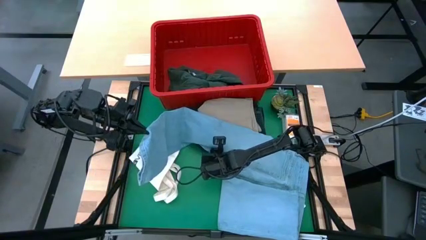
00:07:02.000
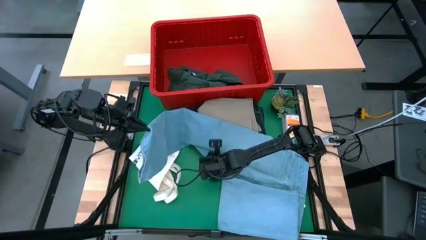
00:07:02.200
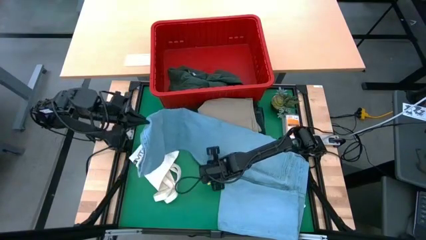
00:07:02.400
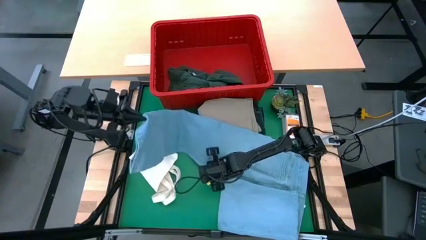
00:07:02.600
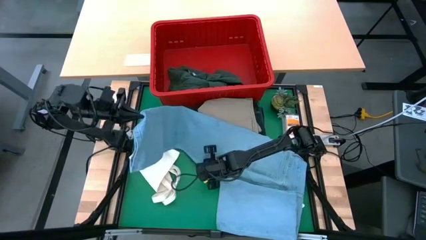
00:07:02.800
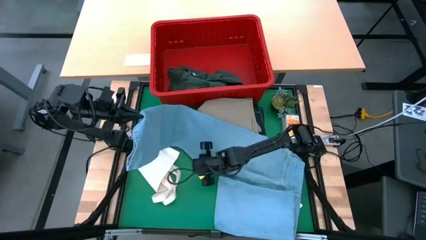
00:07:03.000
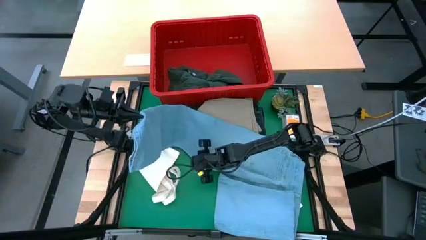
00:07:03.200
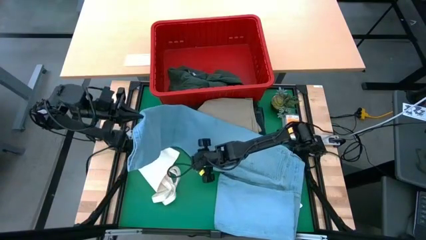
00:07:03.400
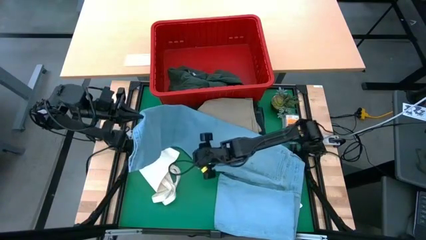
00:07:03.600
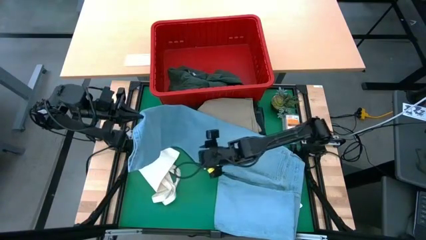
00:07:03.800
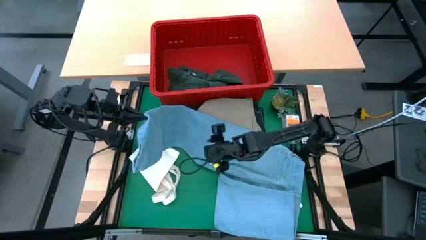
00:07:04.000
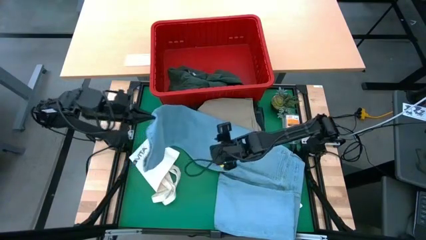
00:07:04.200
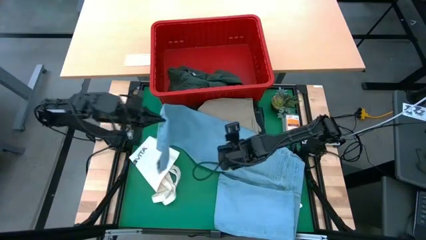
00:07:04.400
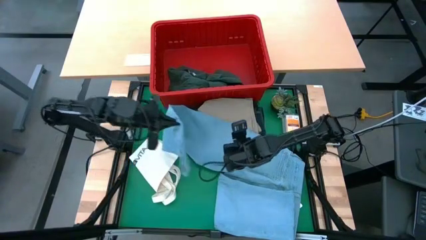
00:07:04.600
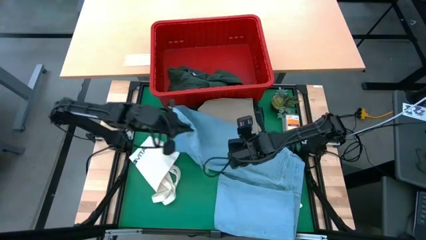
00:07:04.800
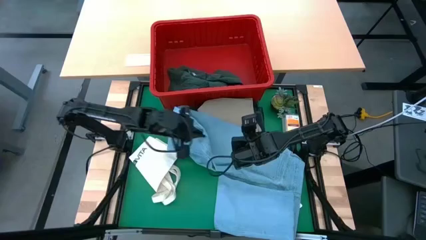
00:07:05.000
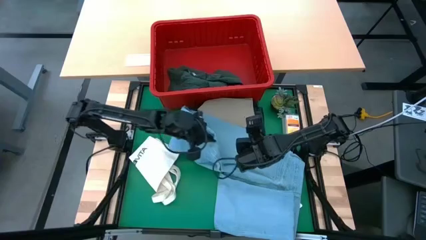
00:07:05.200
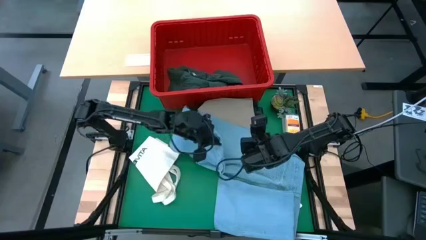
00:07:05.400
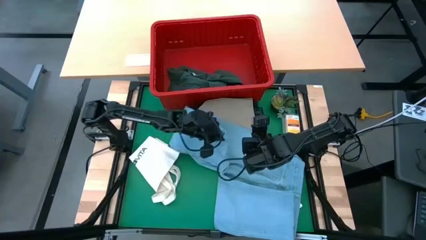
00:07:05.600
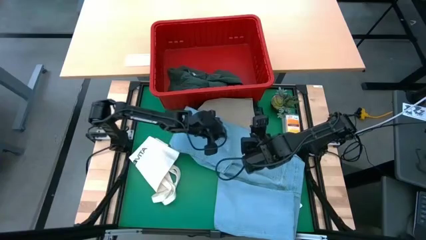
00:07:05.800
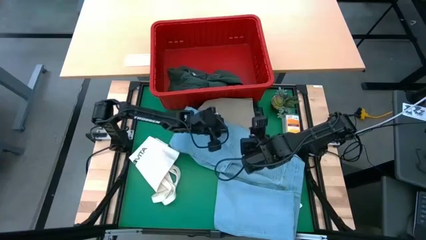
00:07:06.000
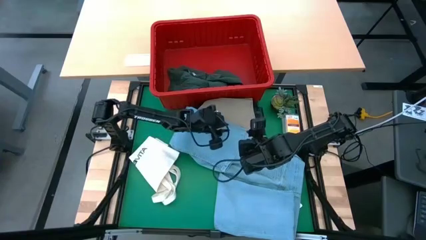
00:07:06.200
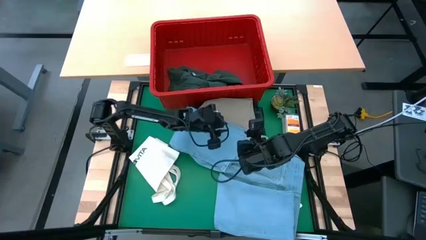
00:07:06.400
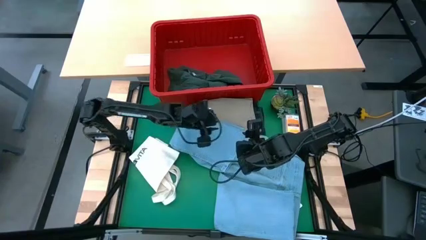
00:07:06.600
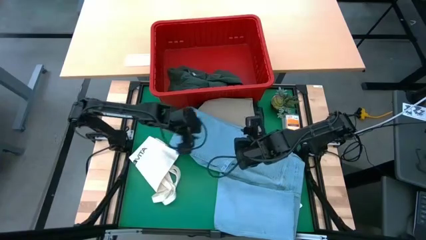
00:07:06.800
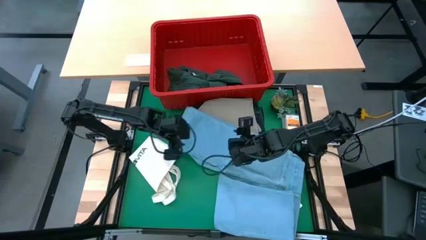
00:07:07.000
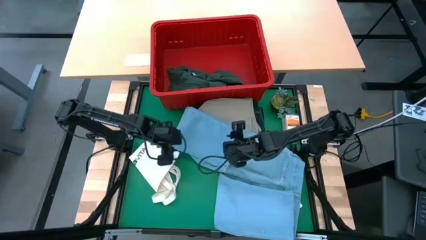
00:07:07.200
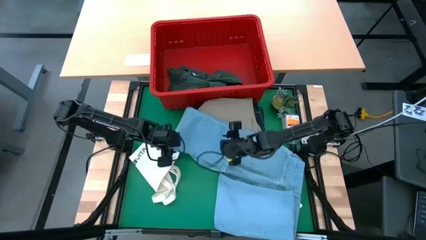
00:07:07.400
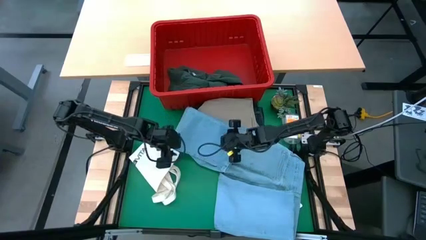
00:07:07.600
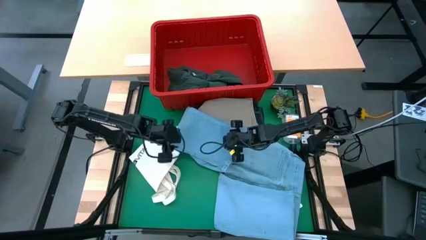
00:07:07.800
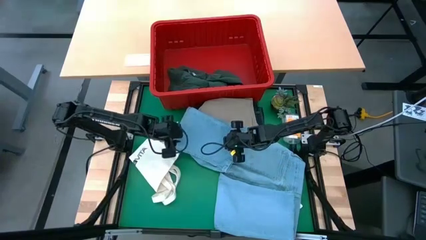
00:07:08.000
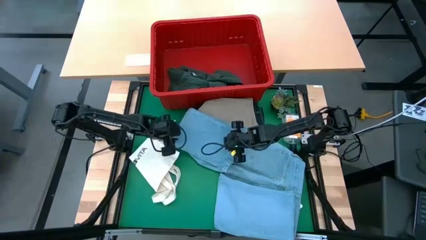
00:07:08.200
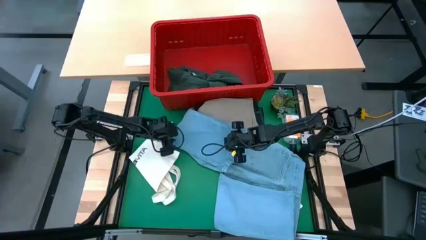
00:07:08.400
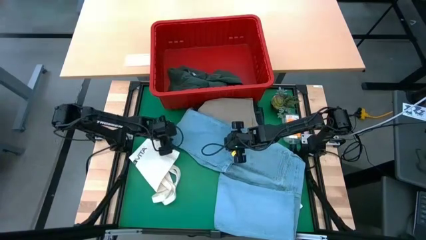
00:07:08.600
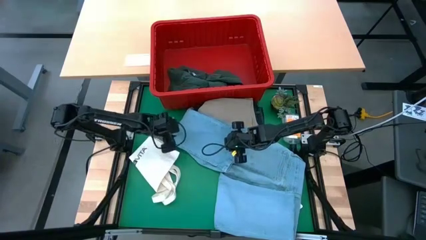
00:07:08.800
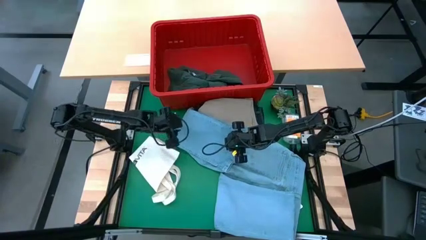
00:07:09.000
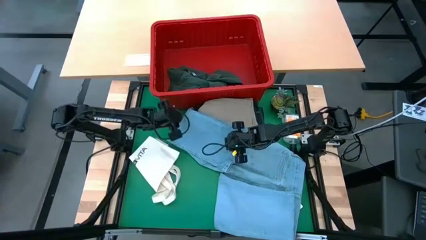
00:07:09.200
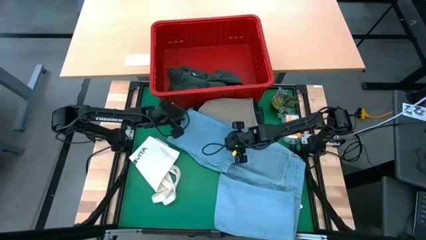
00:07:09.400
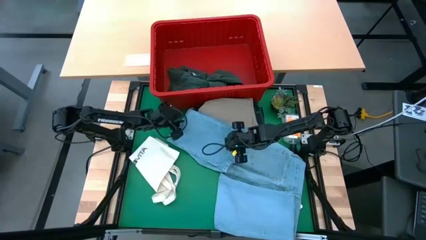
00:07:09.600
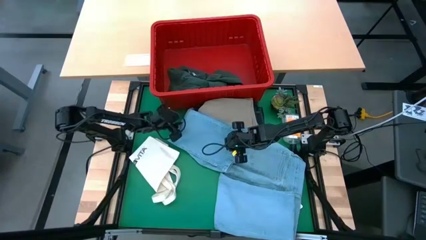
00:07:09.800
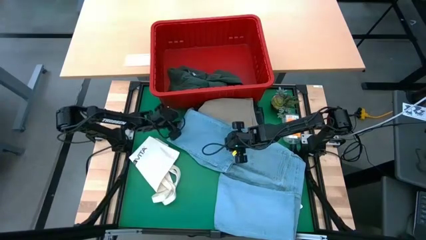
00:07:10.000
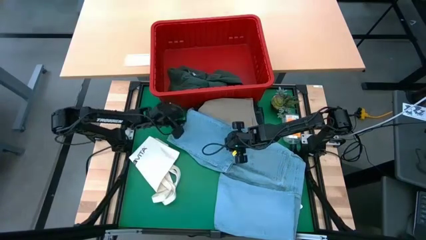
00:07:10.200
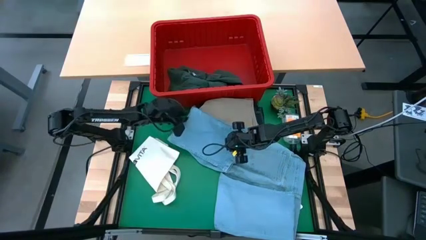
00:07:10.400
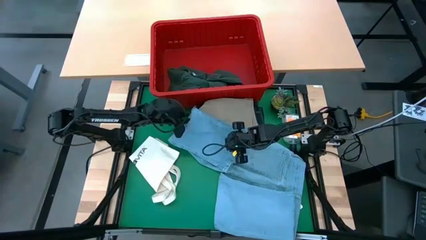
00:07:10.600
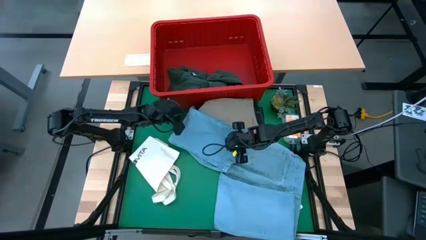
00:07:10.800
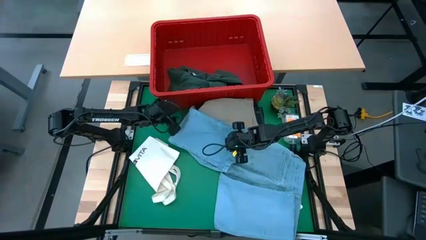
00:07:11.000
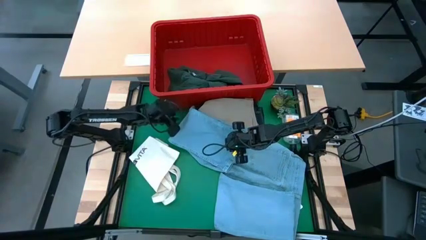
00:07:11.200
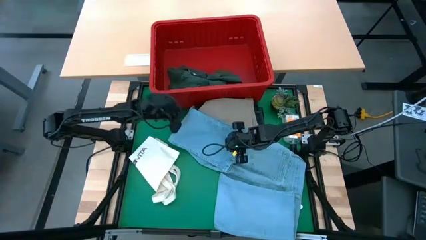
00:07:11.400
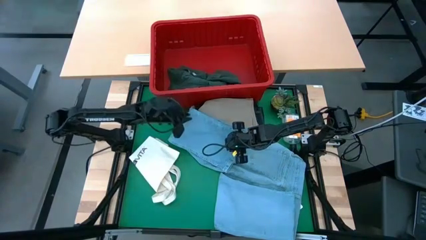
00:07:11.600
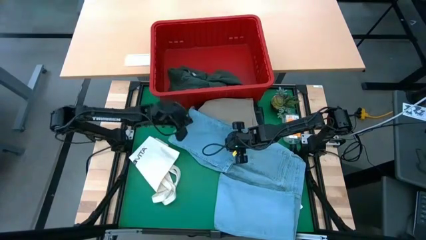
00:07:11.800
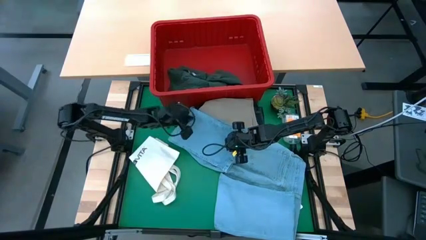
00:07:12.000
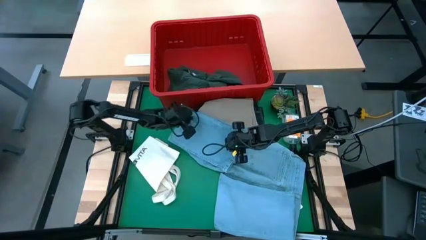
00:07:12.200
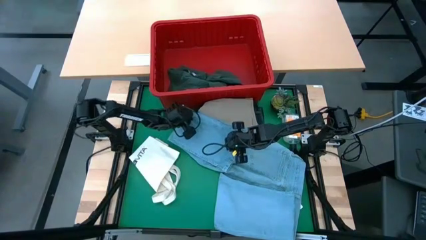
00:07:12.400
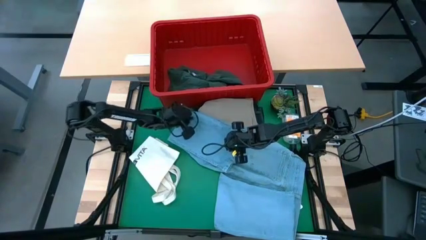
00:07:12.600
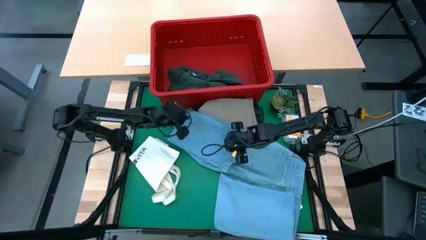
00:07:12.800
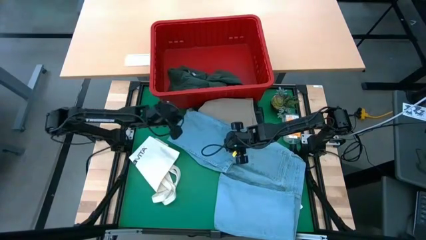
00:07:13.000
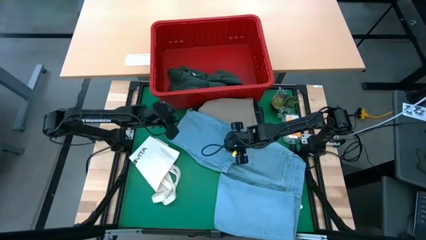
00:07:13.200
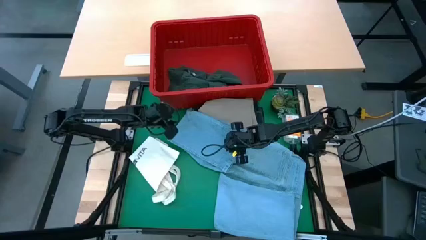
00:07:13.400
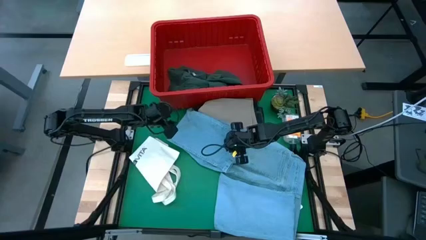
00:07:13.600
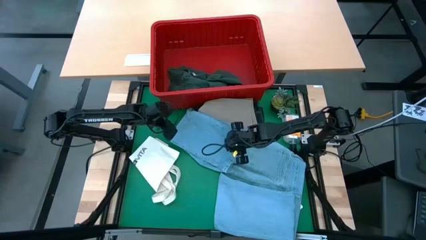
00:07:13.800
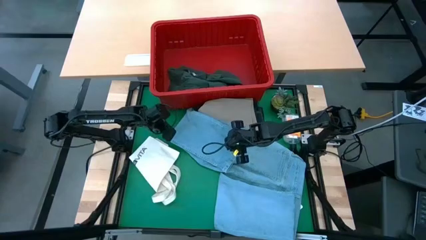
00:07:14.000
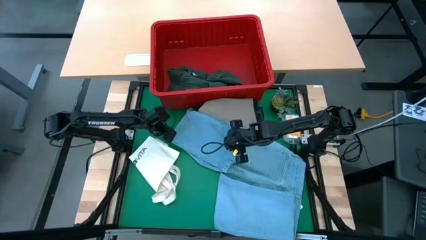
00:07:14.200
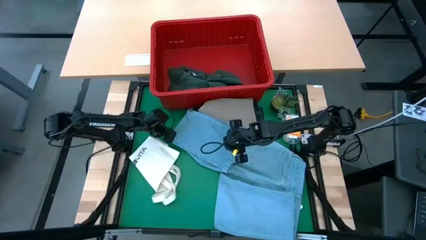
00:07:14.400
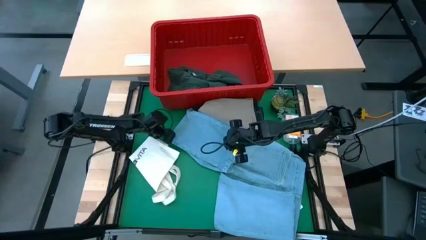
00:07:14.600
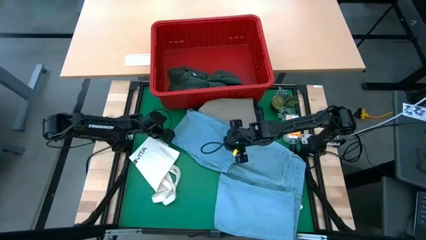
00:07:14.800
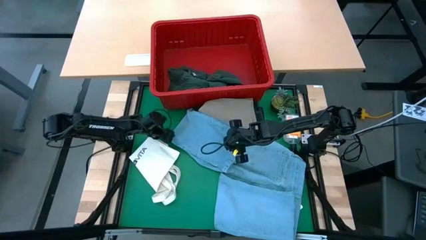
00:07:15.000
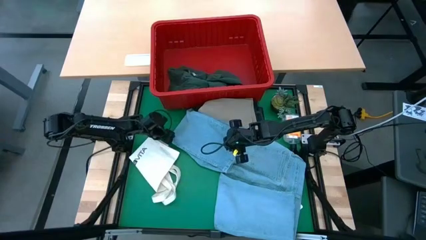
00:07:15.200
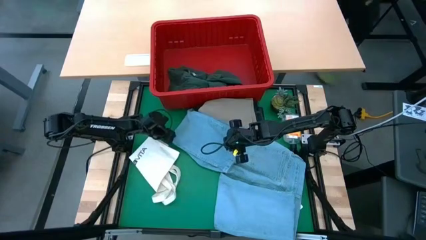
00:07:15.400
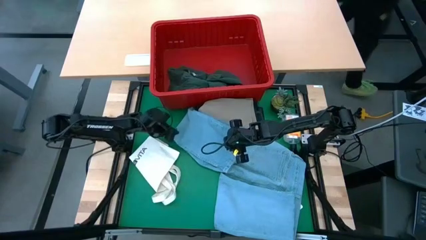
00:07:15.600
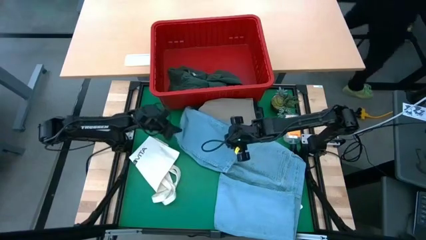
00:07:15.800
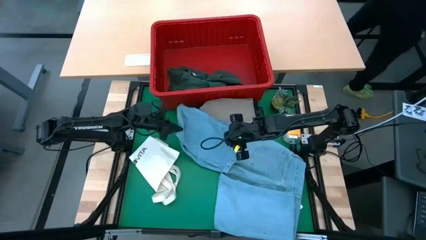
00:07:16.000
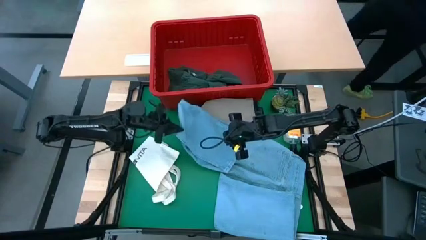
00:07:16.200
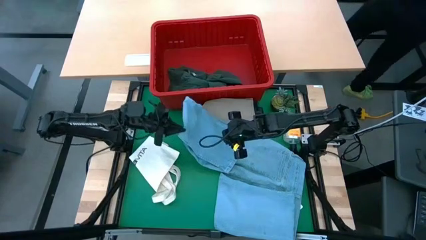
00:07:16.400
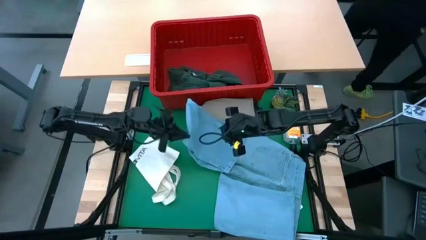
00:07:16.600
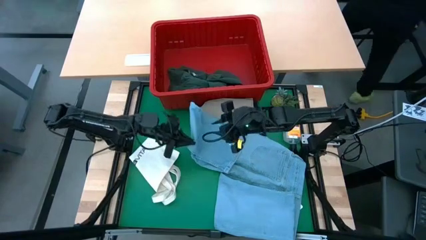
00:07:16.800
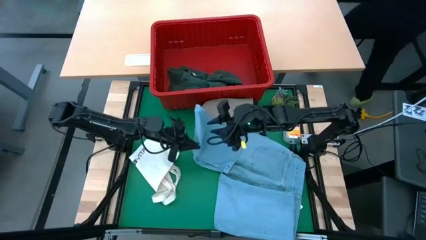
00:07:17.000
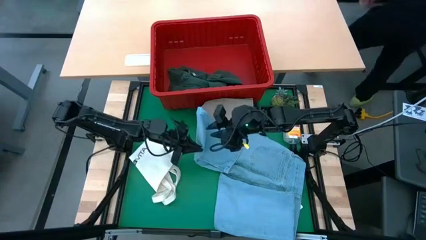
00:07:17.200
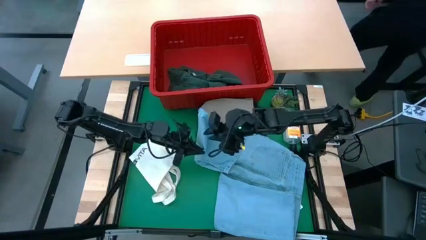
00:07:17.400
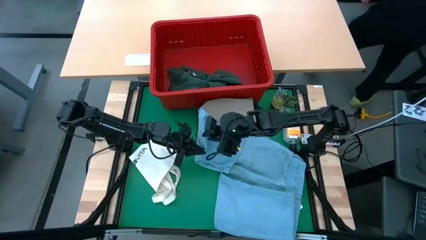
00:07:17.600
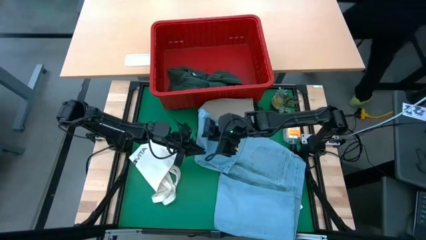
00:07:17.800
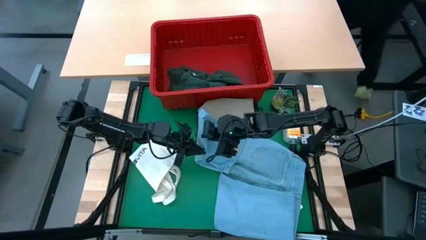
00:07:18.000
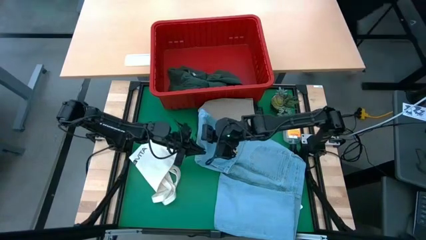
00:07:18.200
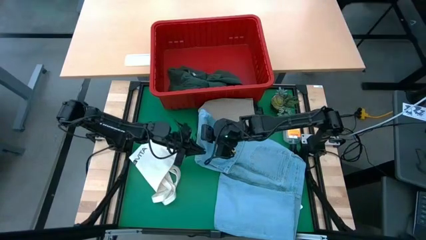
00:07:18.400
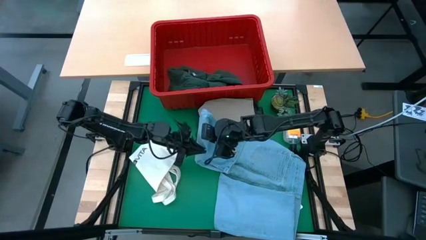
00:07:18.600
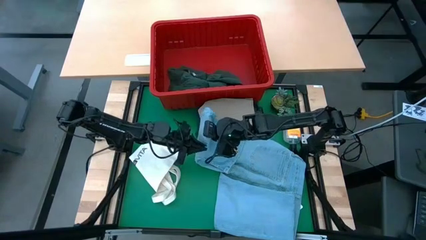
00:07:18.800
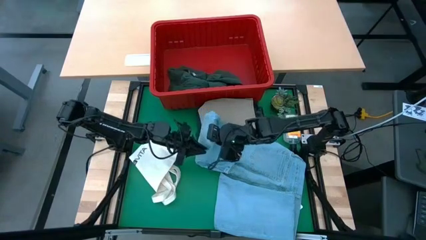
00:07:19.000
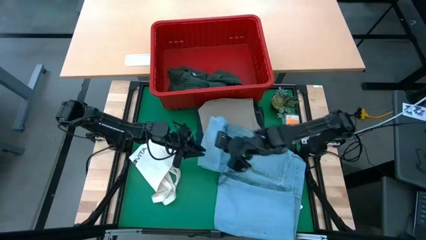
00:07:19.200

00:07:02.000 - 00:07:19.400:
Task: Fold laundry
Fold the blue pants
